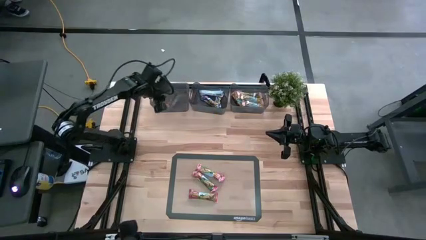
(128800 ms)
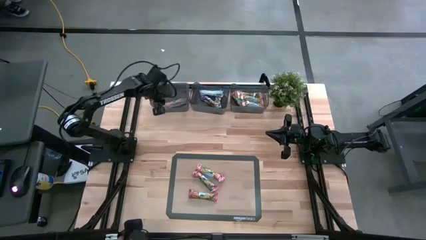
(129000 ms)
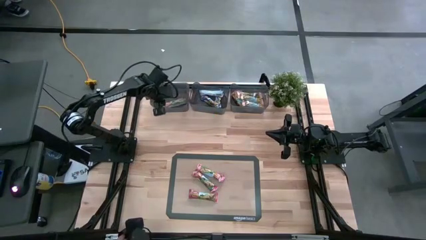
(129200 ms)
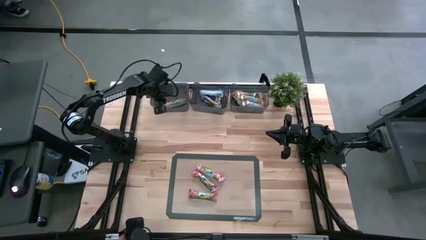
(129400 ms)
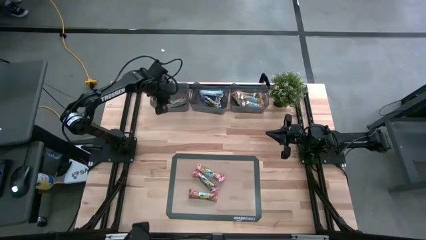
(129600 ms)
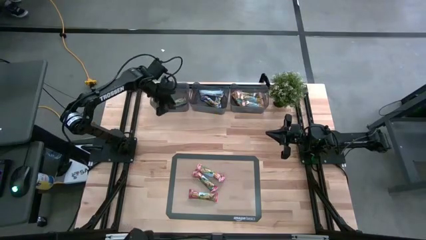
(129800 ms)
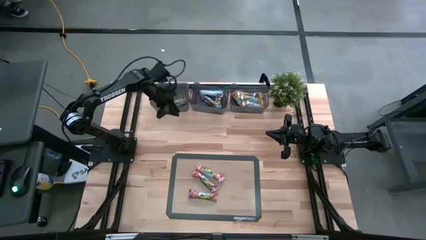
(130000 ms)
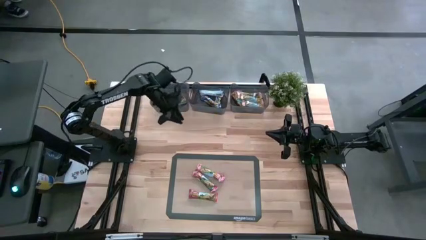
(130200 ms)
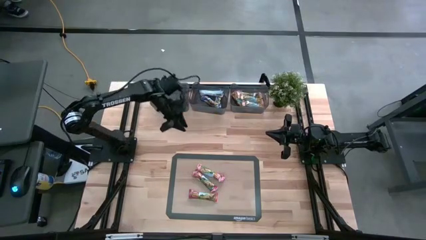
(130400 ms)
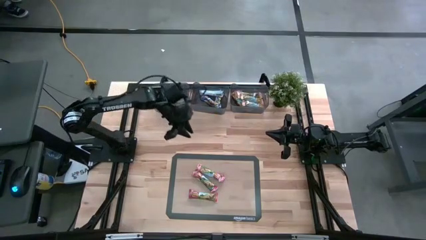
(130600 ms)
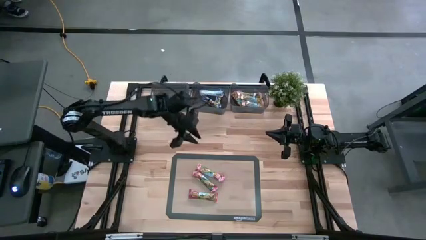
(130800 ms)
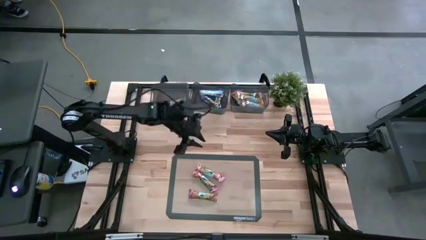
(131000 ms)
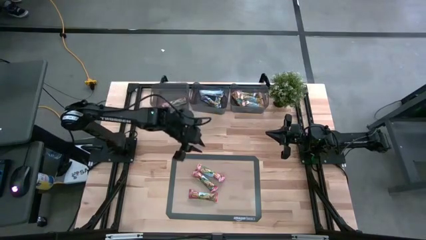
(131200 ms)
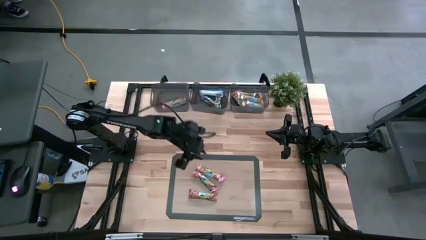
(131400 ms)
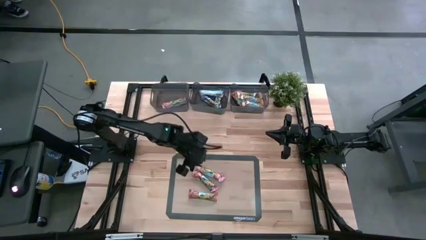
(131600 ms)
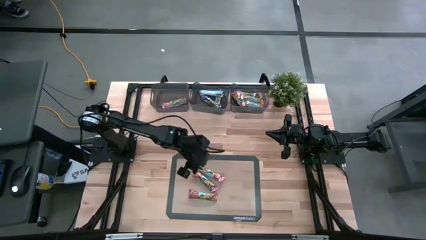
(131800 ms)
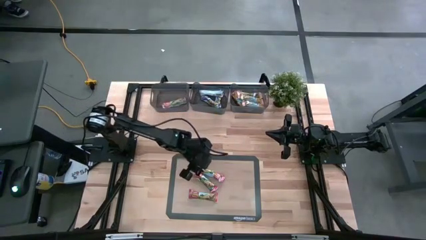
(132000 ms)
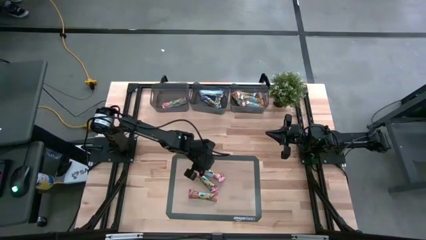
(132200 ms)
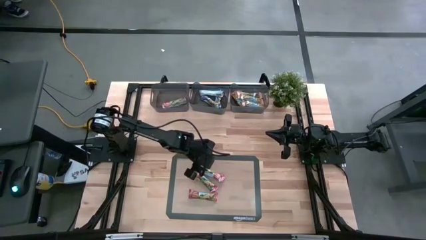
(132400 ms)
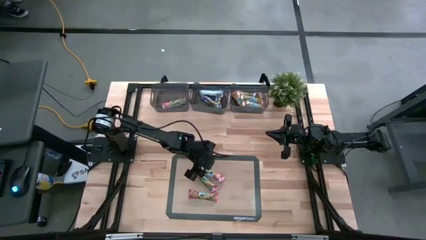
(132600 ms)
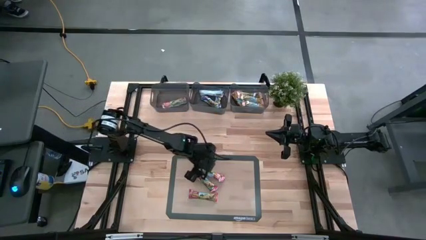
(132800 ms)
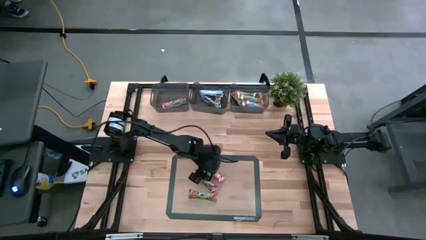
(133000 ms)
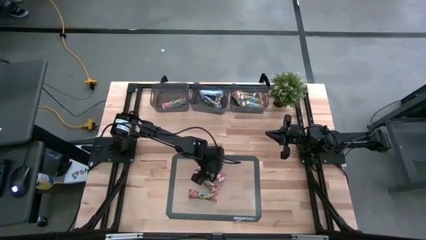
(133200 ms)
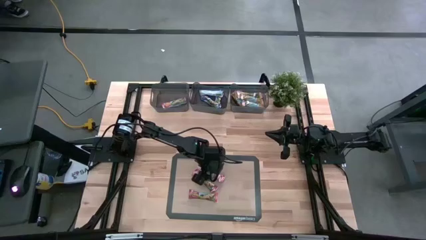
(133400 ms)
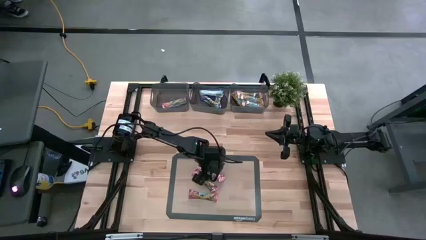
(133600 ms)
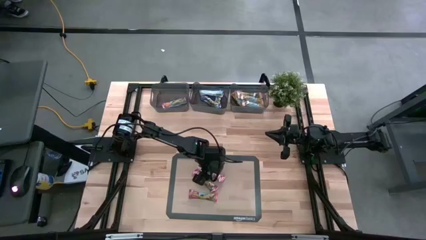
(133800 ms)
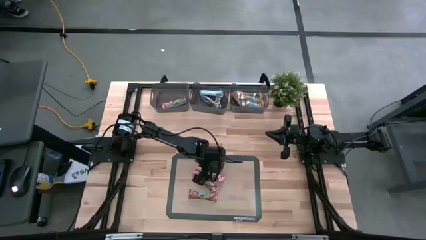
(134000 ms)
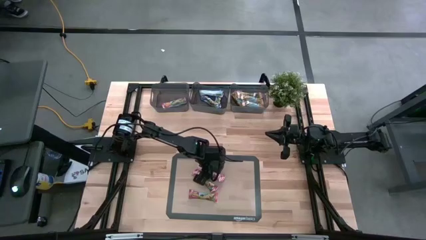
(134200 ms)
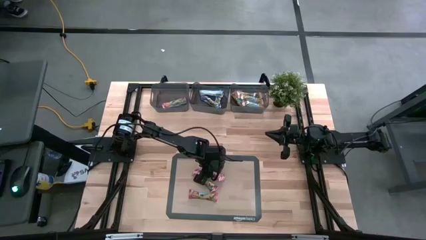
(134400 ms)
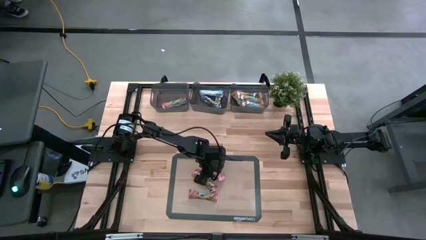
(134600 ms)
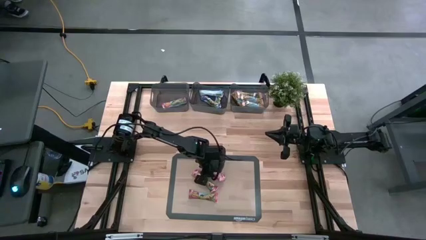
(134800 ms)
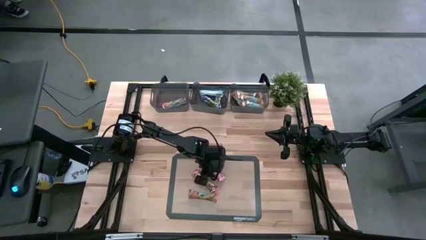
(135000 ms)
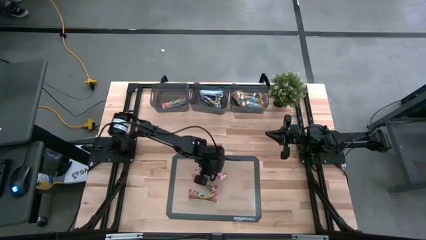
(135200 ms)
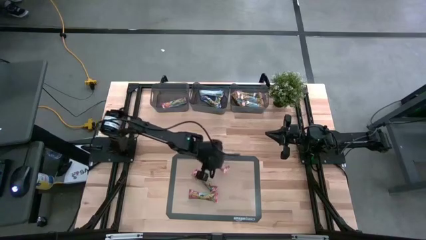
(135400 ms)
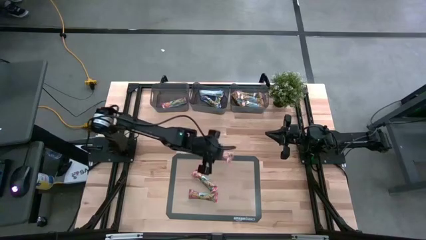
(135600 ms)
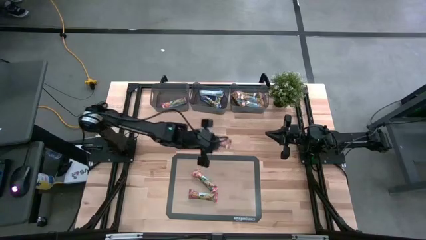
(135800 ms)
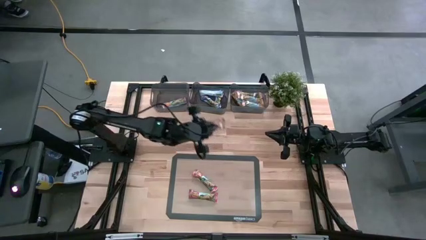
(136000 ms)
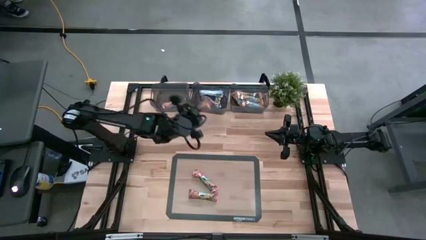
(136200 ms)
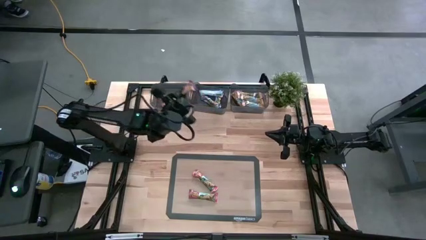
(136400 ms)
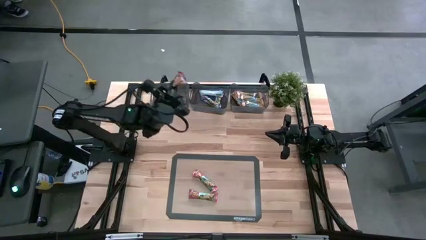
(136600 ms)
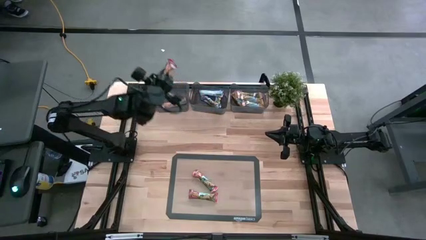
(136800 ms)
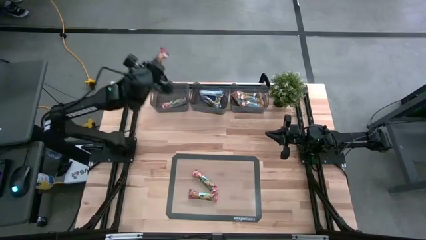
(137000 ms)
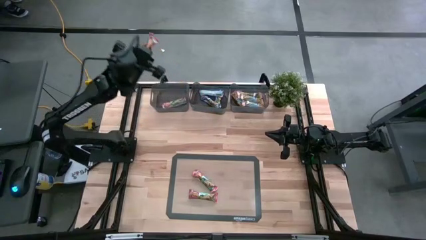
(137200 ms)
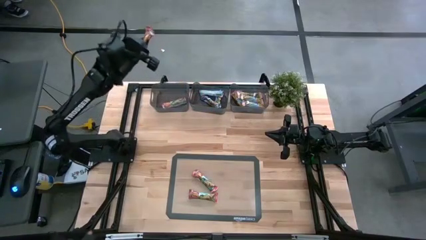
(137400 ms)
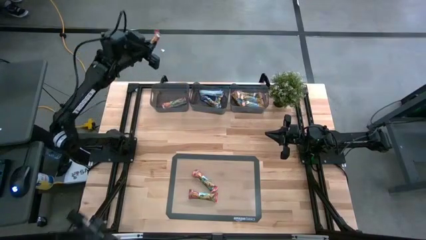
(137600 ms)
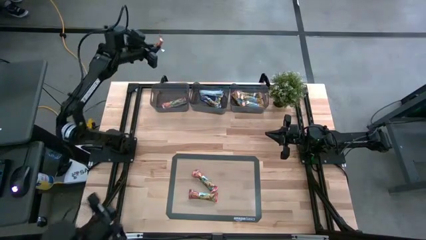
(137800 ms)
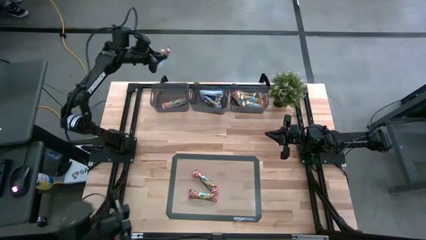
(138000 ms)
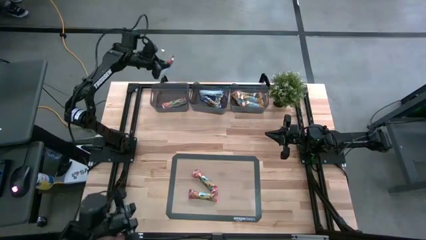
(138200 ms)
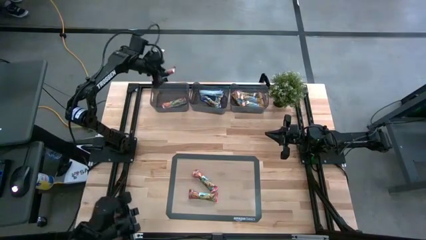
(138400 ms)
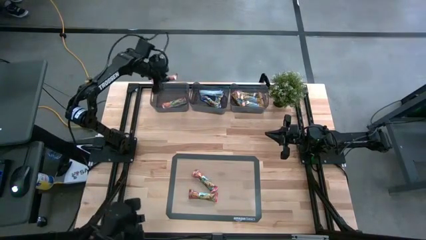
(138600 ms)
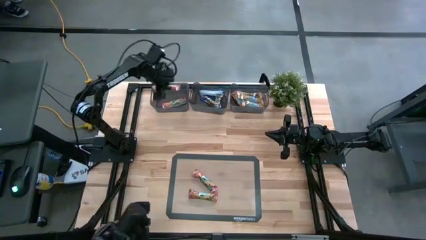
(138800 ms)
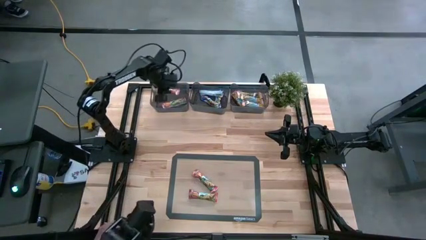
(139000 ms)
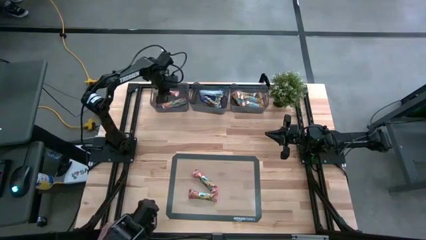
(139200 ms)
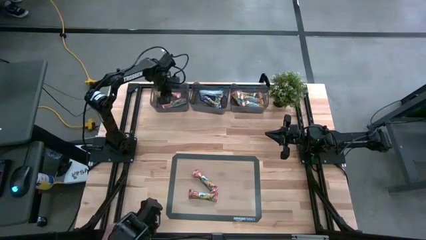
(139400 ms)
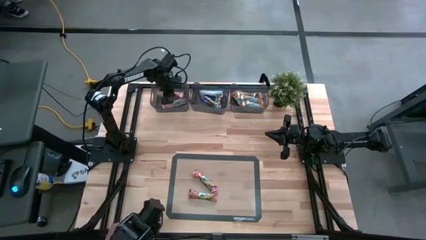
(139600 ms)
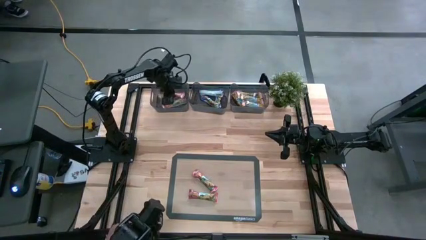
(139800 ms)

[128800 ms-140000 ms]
Task: Pick and place Granola Bars by type
Put the red granola bar into the left black bin

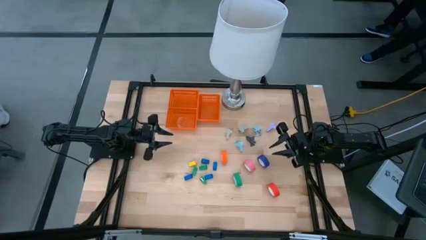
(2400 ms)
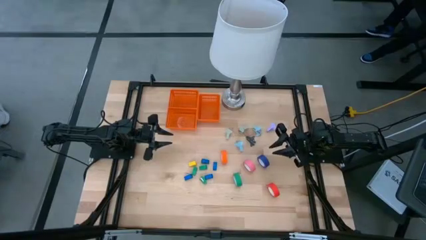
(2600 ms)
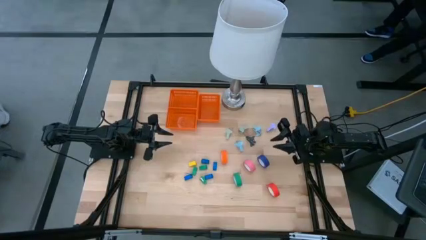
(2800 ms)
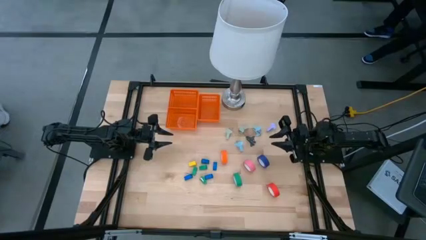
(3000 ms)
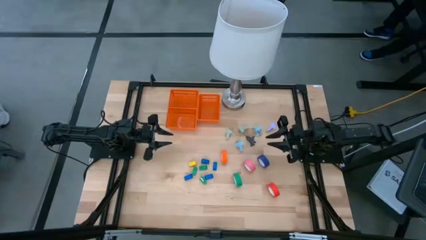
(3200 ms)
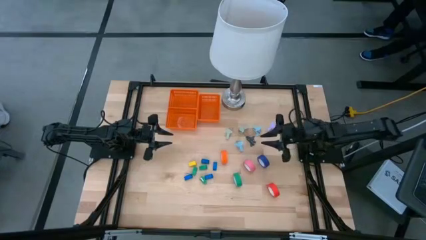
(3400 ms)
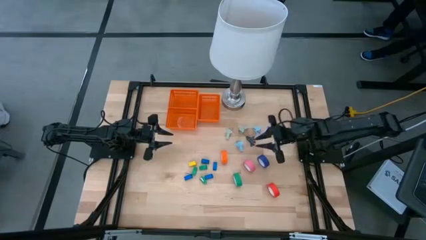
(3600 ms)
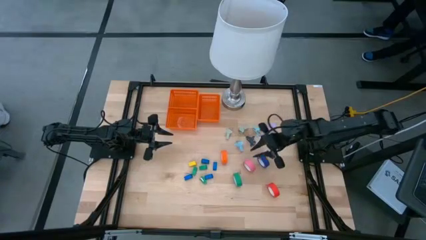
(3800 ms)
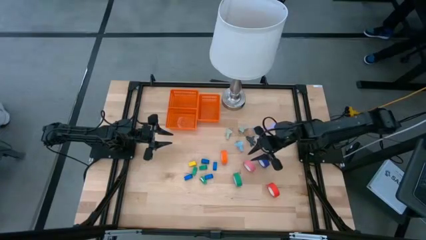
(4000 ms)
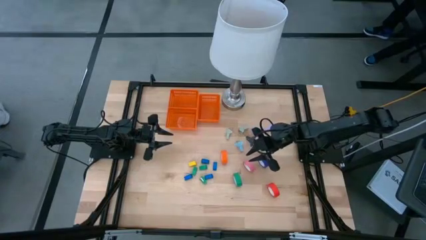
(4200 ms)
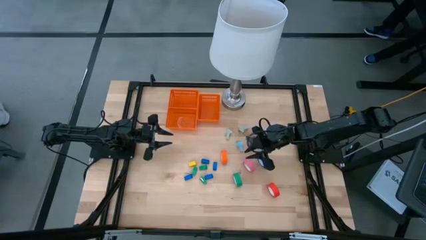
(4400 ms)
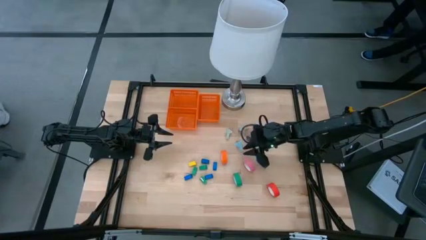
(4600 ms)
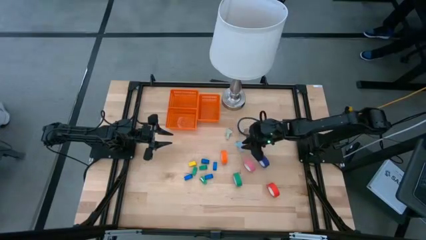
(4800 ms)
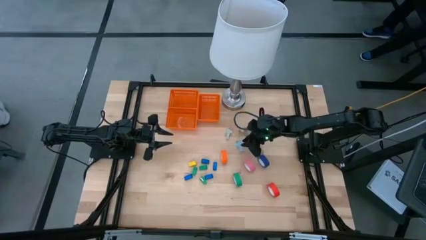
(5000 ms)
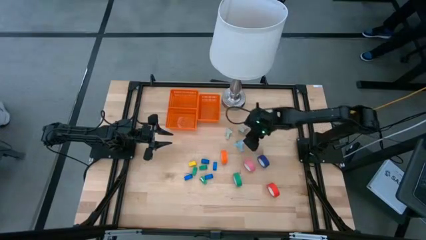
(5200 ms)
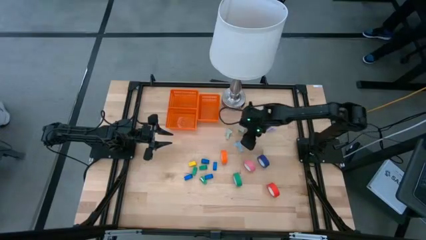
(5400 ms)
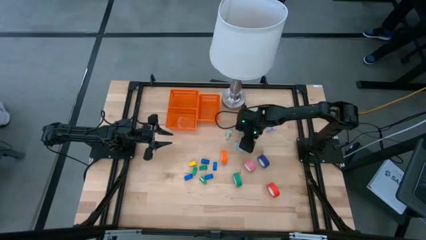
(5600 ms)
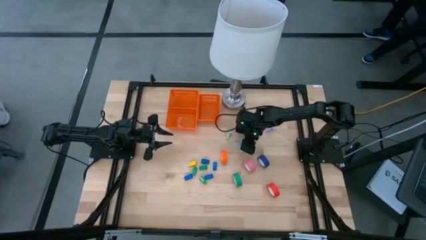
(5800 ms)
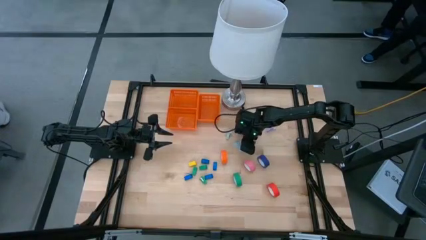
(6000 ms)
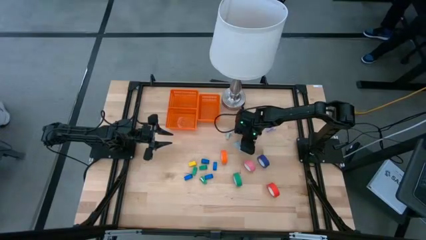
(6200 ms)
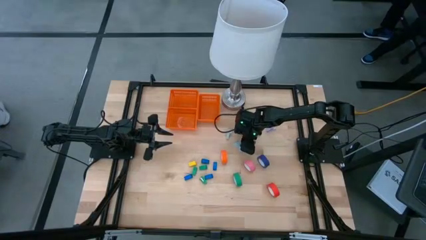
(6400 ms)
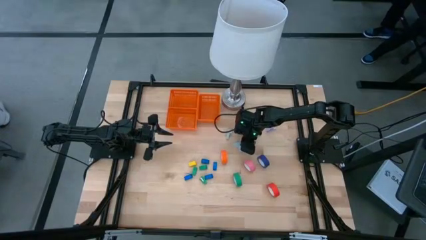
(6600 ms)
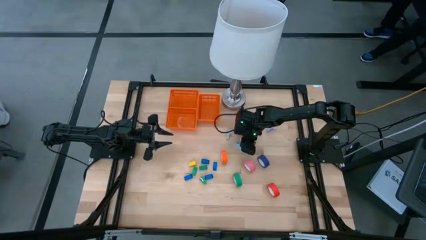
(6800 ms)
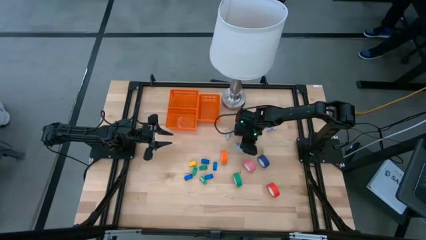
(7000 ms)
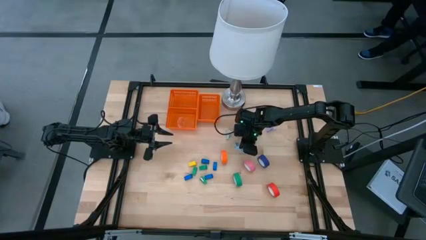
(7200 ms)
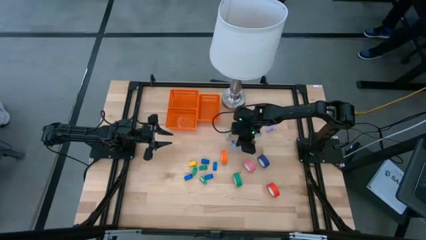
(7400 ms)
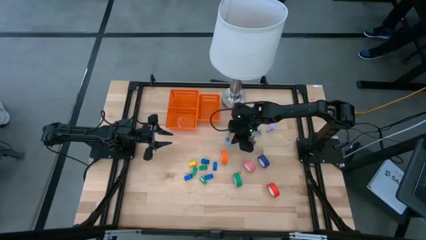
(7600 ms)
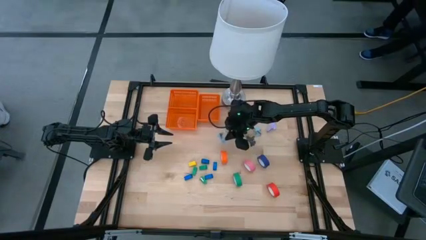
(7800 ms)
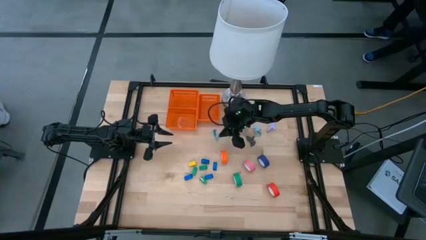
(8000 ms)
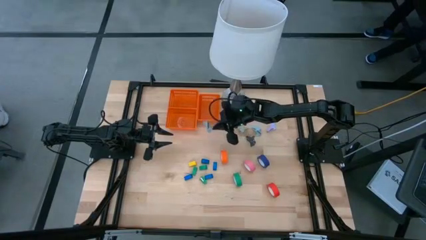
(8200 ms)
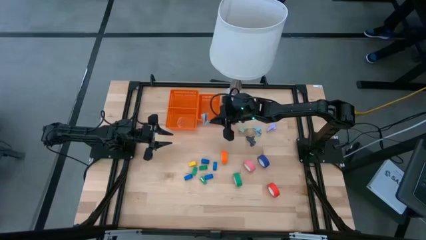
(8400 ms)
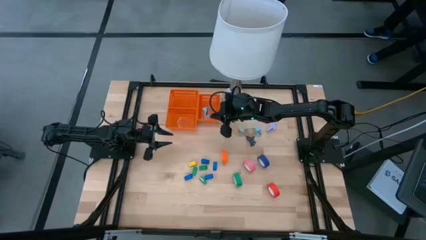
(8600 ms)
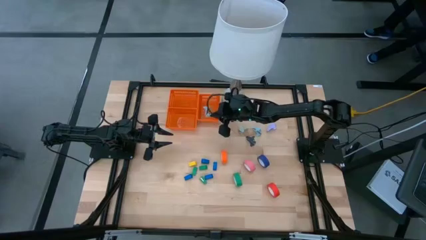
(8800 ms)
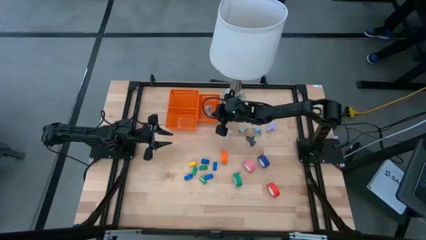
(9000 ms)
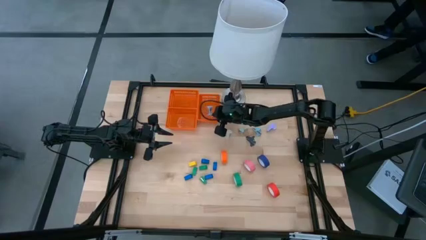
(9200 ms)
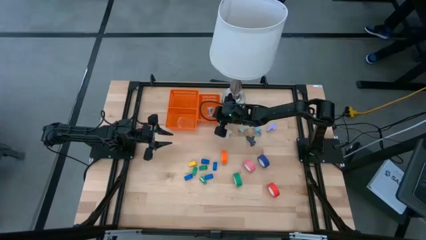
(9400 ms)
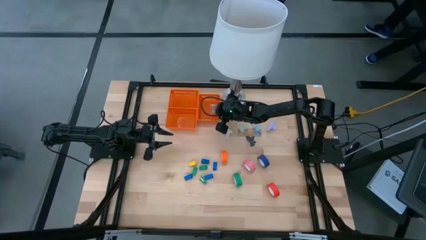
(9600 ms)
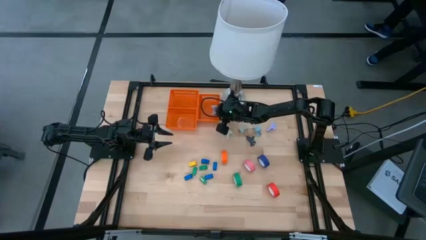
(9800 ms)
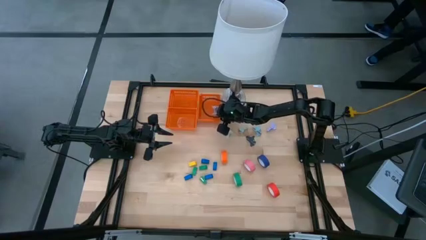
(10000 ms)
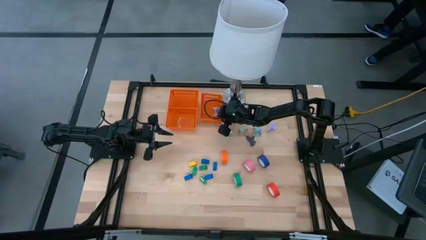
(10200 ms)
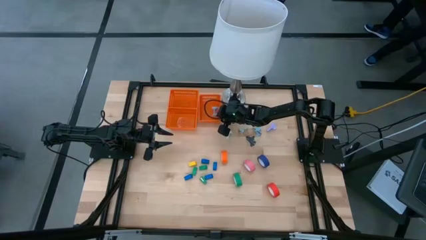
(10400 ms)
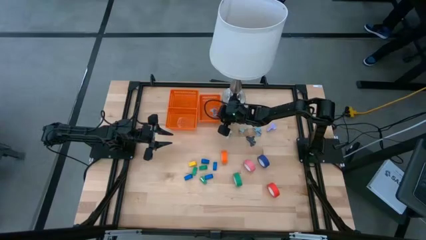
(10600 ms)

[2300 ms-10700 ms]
Task: Pick and place Stapler, Stapler remover, tape
Put the light blue staple remover into the right orange basket
